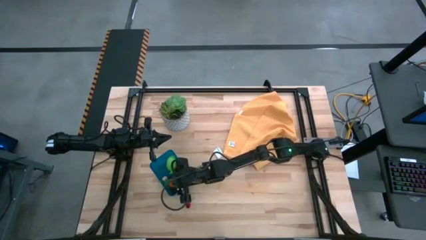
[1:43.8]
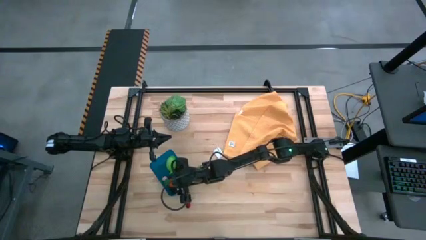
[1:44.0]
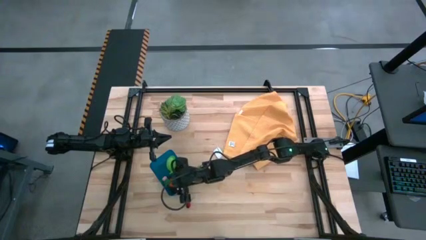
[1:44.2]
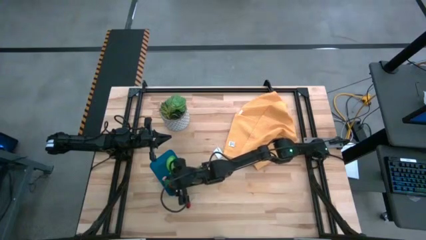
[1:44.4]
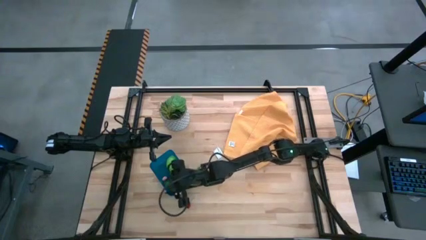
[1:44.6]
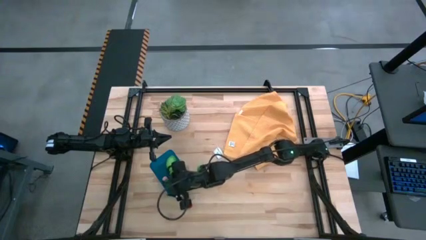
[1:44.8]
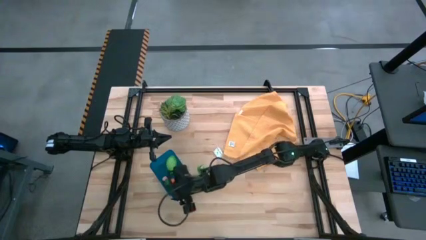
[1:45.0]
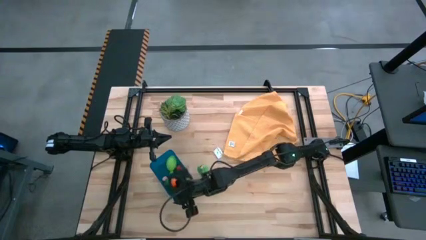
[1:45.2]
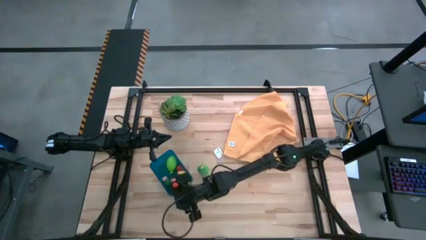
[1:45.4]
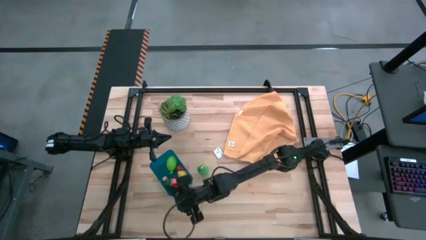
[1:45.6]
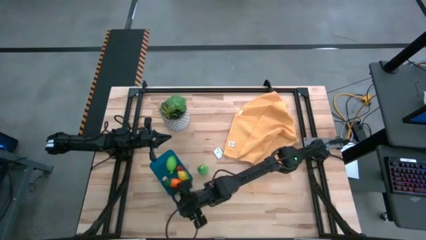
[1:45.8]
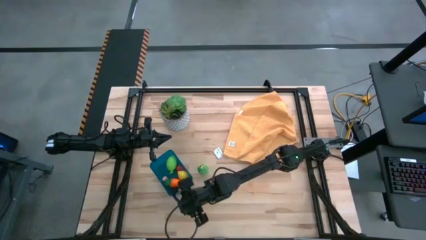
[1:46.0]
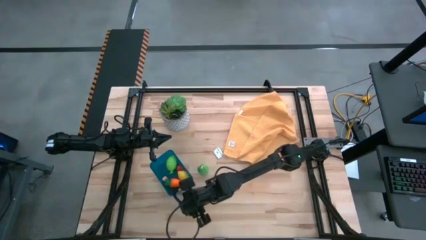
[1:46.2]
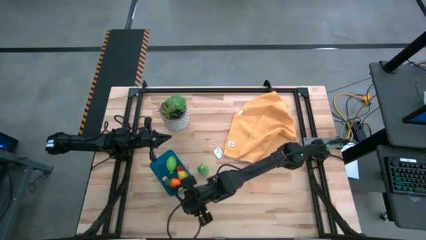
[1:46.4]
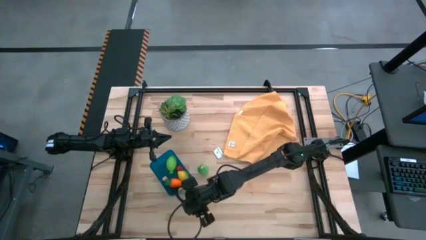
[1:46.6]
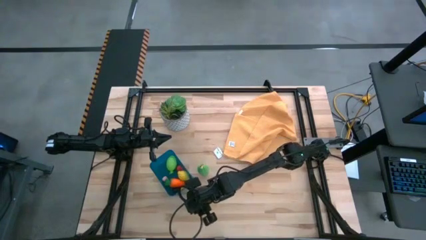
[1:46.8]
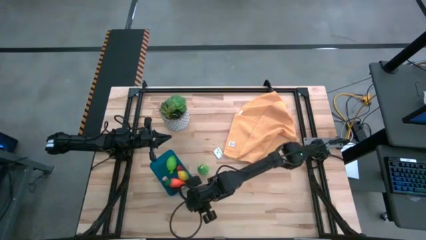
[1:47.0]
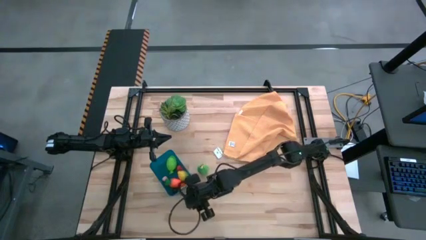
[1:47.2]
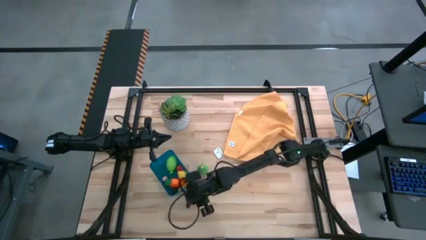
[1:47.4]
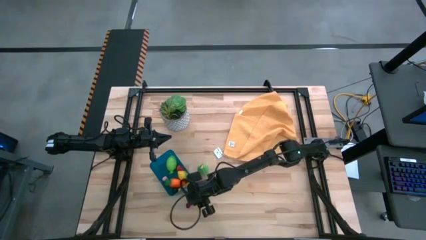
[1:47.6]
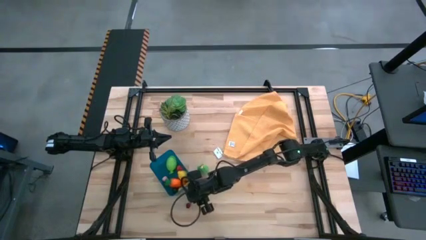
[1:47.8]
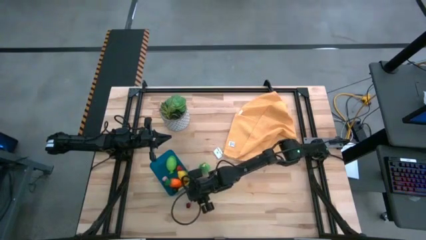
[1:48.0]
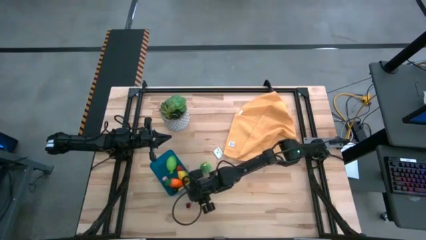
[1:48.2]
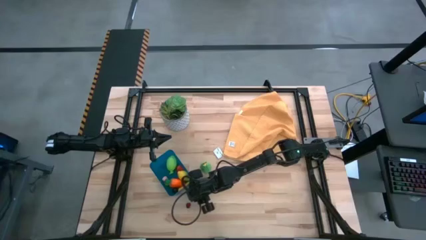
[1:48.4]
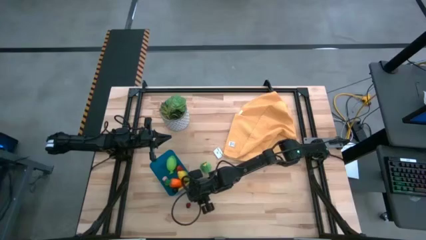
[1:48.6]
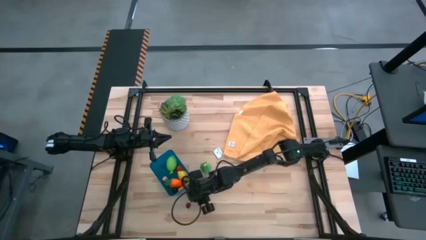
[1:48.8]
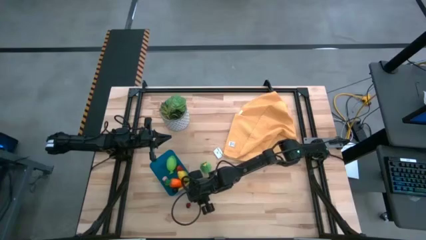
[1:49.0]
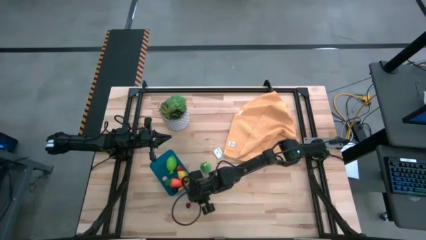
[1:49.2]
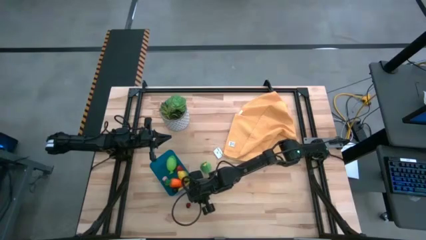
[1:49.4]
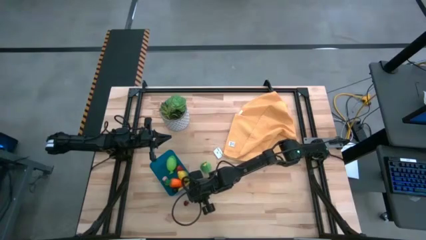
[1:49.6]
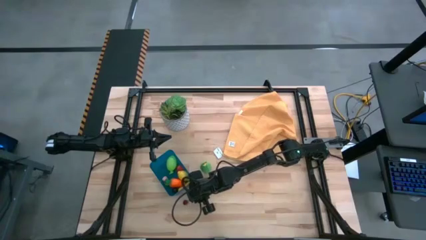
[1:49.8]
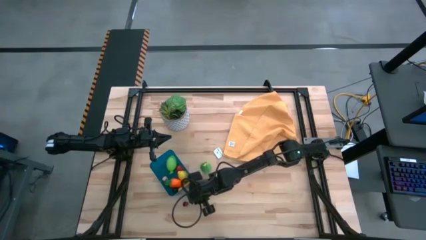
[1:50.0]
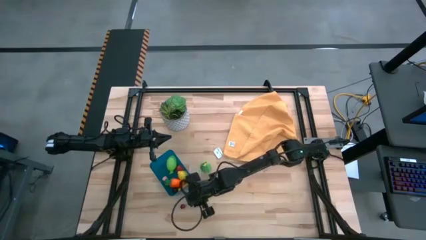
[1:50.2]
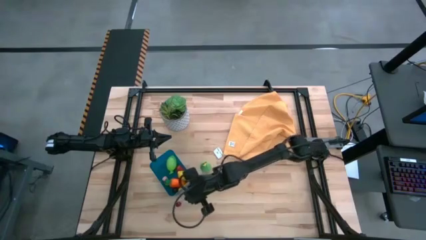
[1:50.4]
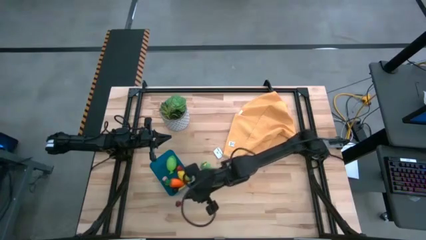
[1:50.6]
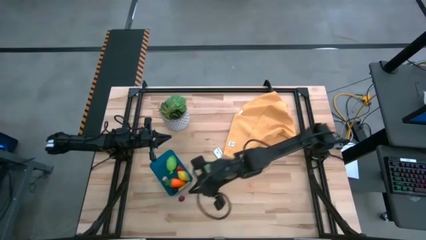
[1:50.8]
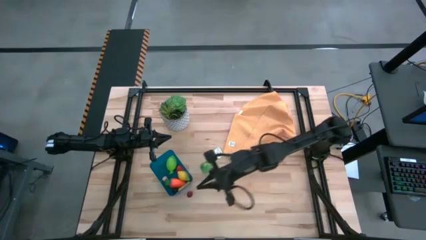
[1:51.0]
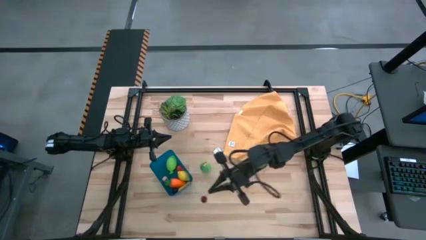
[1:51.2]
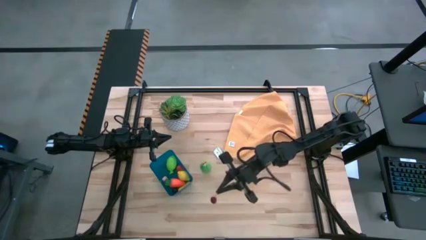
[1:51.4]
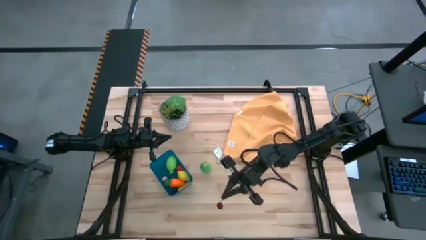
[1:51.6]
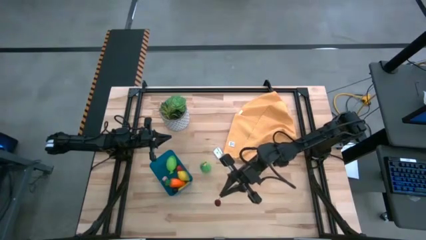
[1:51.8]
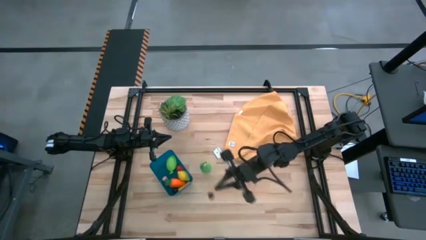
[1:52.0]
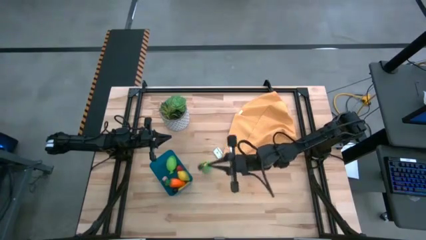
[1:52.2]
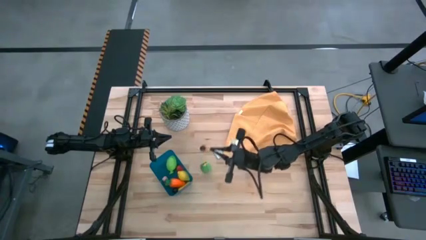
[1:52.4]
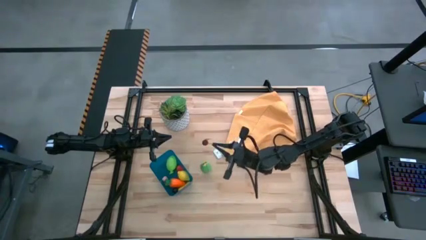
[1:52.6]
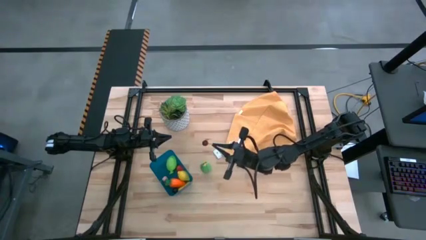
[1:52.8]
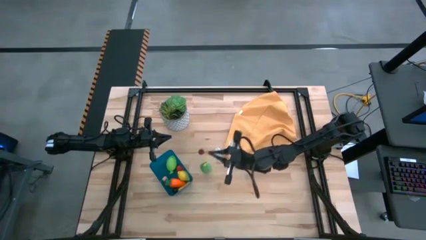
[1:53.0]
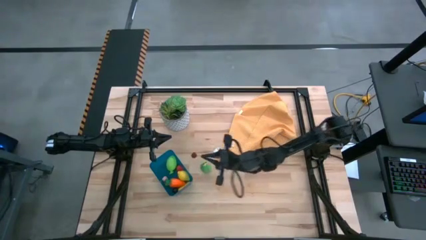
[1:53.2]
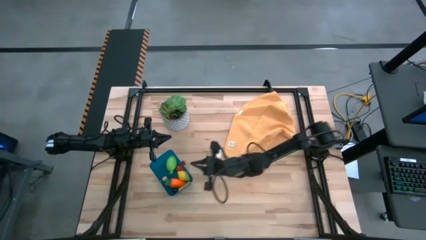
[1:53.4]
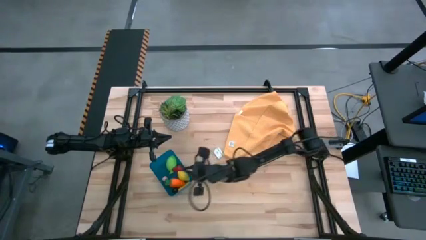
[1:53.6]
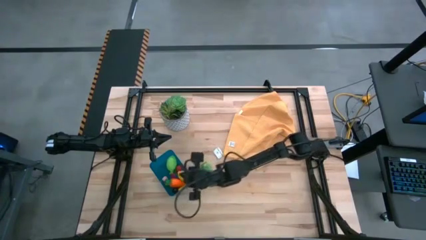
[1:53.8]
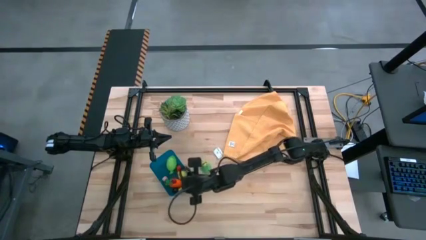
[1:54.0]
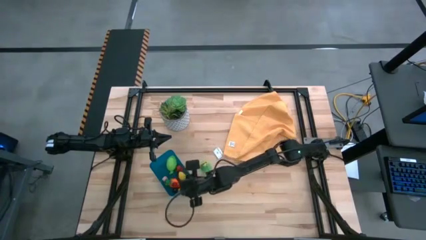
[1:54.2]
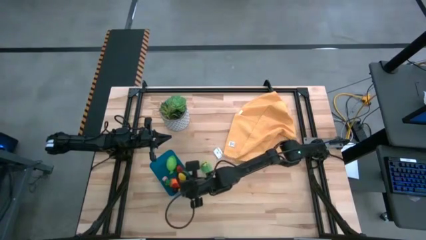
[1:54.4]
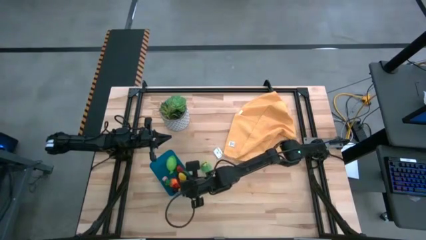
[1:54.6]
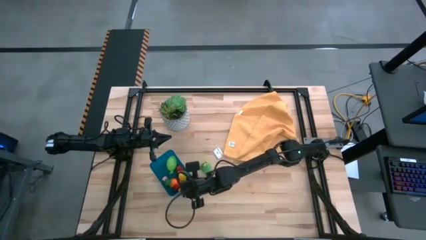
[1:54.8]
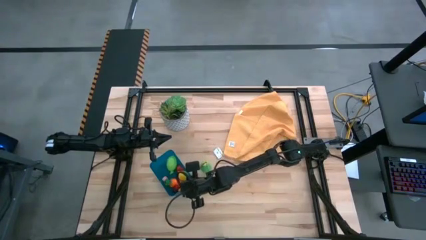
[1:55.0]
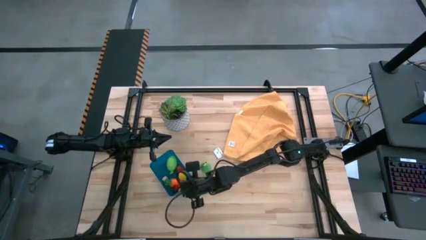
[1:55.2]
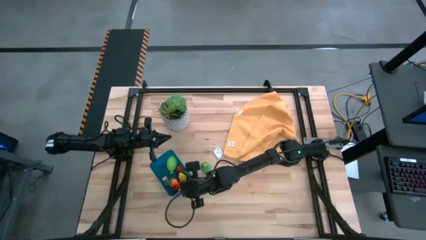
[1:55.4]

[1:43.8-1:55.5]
Task: Pick and placing Produce into tupperware
Put the red cherry into the blue bin

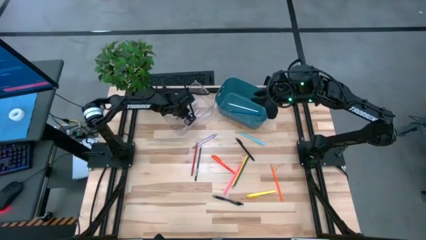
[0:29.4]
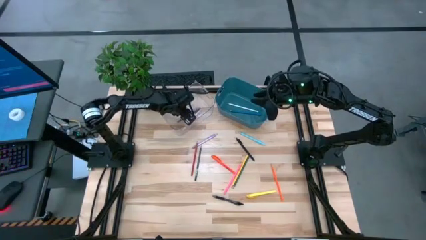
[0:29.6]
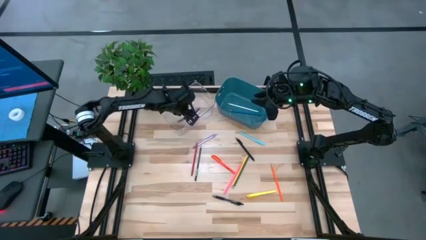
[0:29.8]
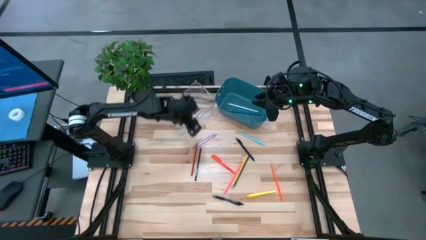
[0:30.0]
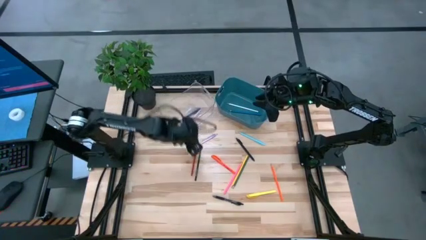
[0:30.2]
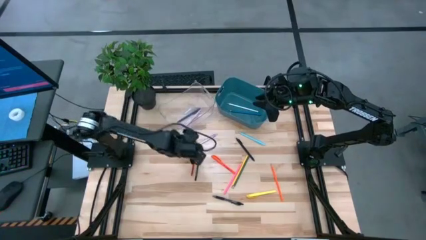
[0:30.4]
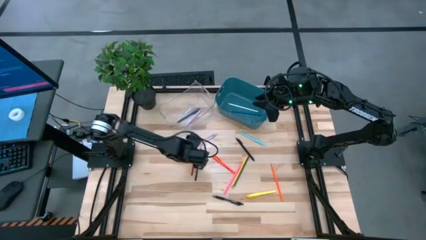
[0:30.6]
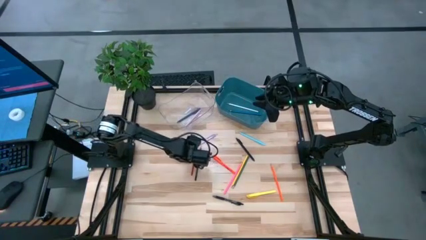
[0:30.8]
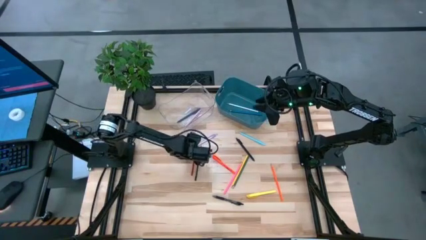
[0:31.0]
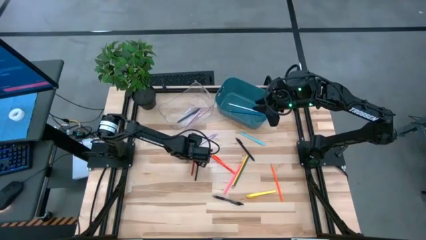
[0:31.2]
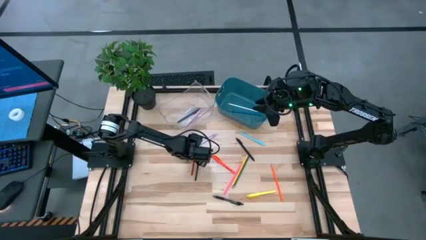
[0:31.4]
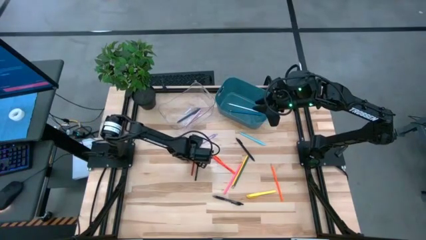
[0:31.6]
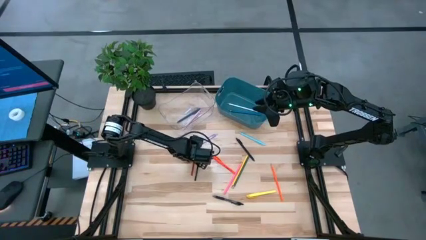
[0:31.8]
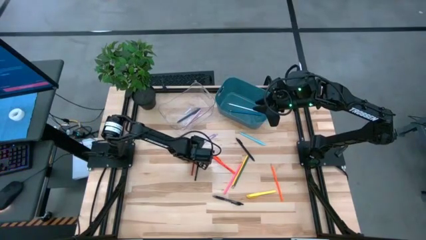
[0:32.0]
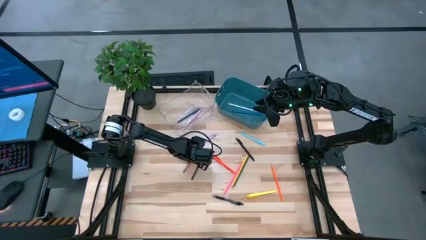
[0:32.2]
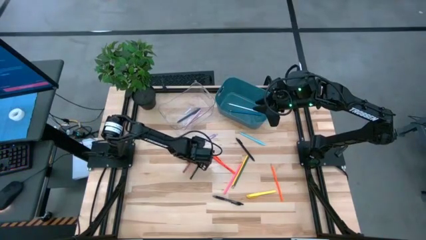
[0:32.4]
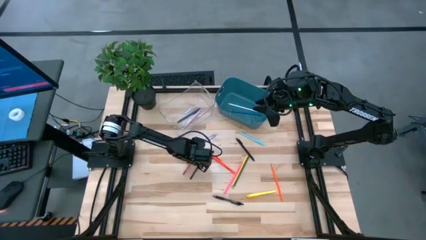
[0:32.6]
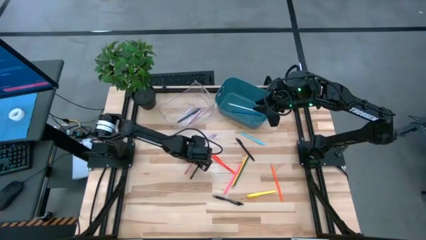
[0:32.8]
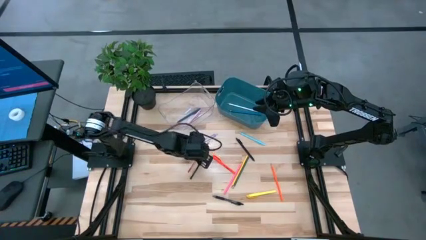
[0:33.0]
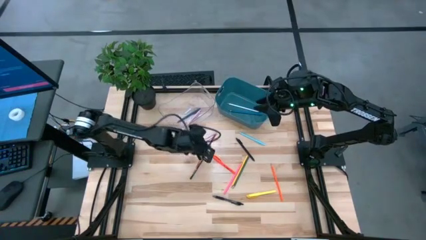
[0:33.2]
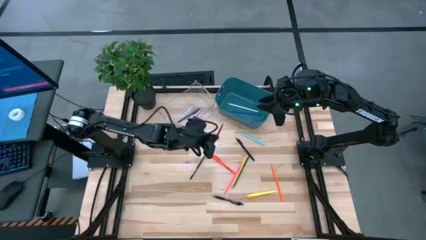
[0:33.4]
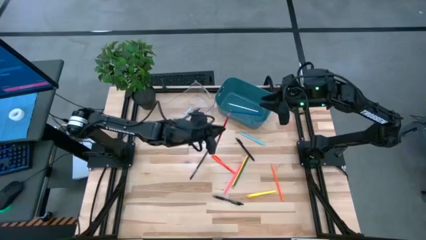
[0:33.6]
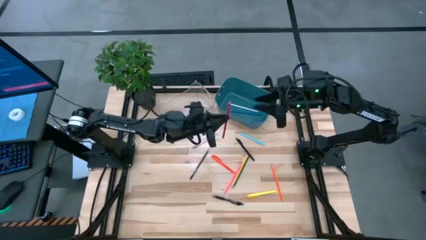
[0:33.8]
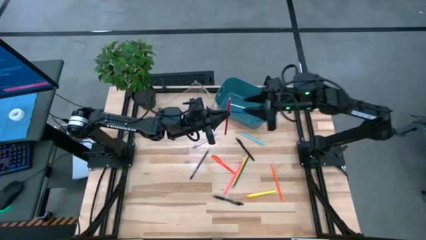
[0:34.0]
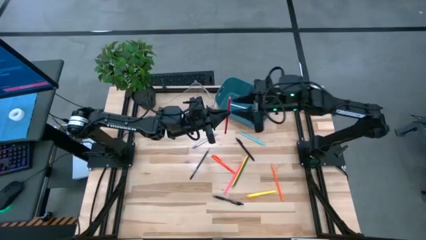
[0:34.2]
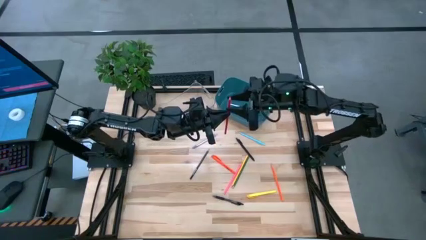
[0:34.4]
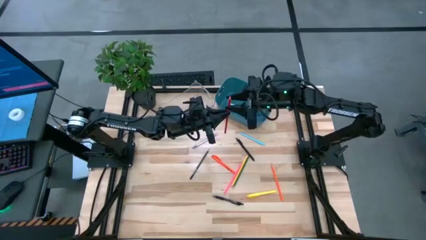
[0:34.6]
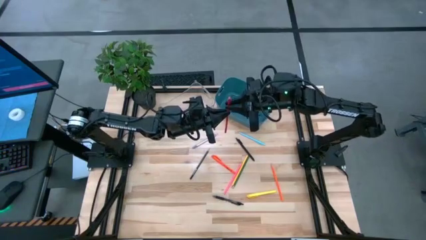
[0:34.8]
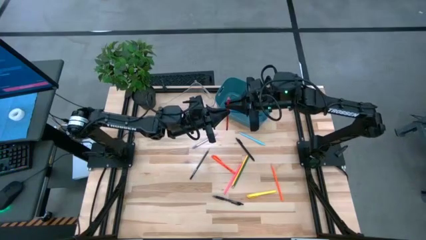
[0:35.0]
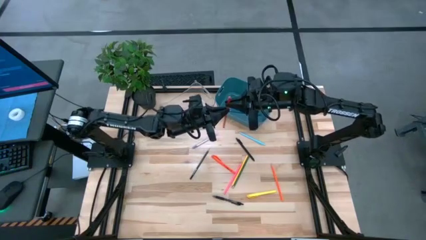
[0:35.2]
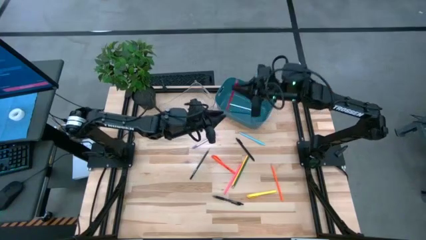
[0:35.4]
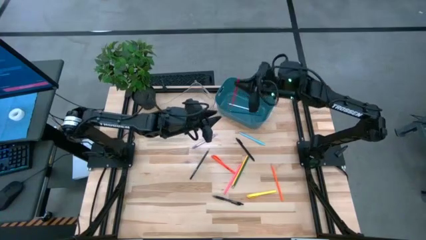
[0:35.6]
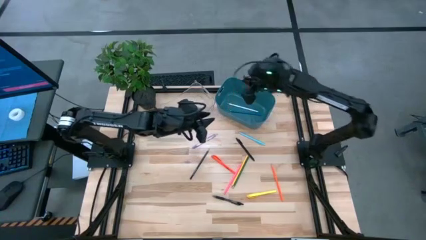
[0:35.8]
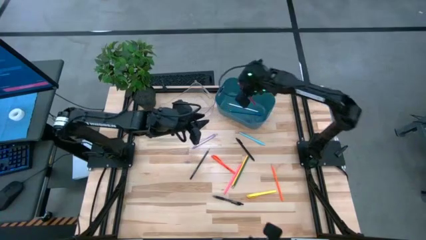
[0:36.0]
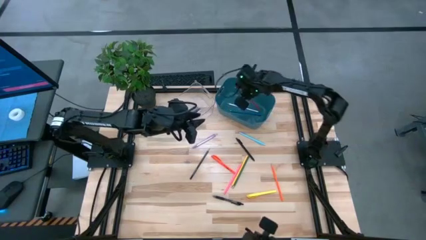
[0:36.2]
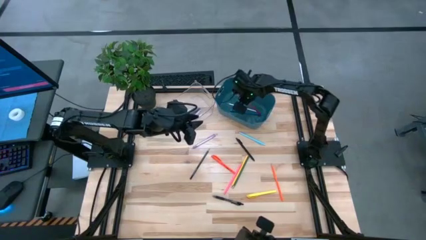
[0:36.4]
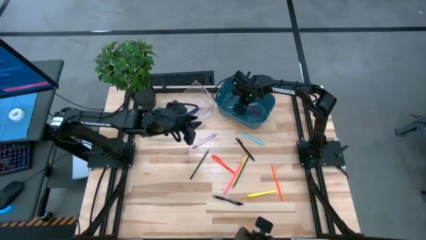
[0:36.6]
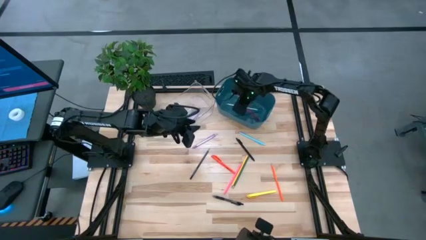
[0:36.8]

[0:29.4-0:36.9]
Task: Sort pens & pencils
Put the red colored pencil into the blue bin
